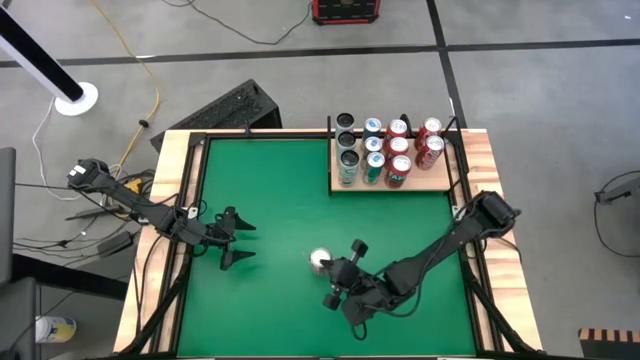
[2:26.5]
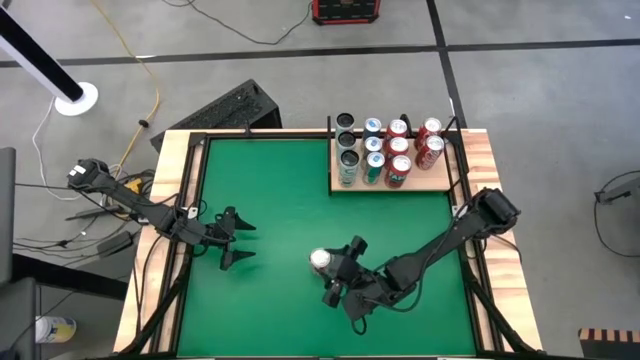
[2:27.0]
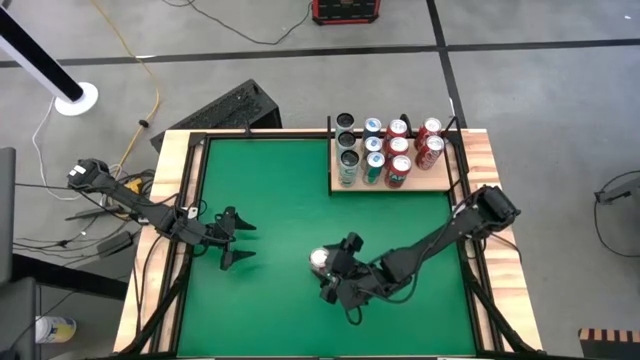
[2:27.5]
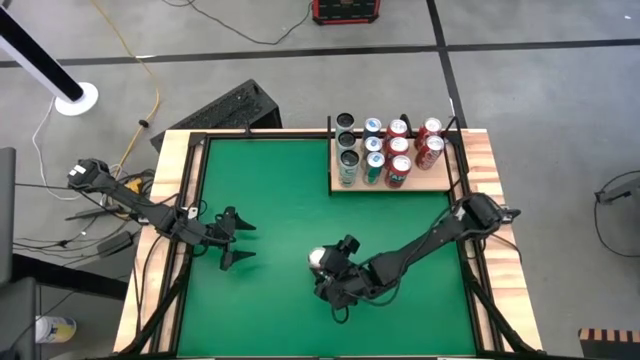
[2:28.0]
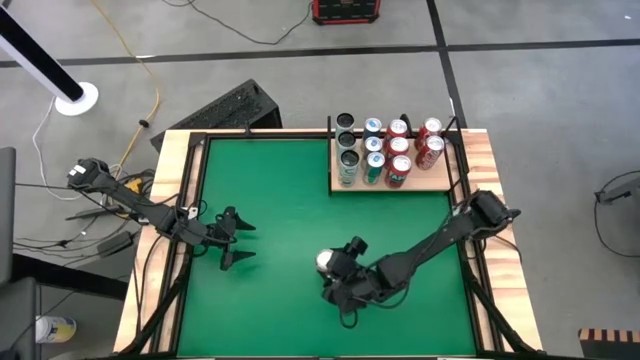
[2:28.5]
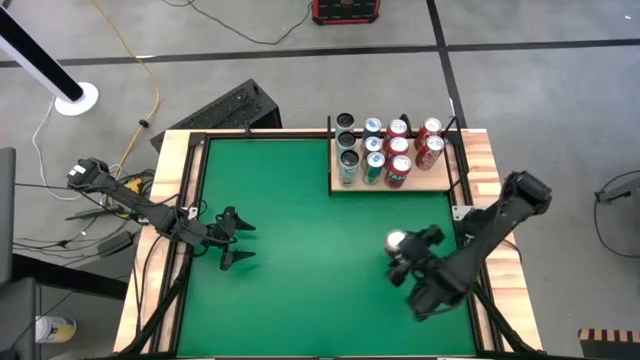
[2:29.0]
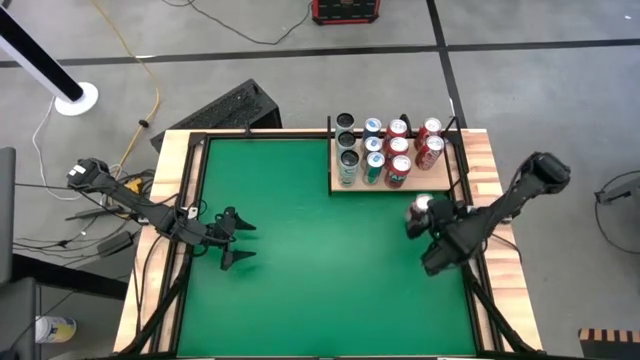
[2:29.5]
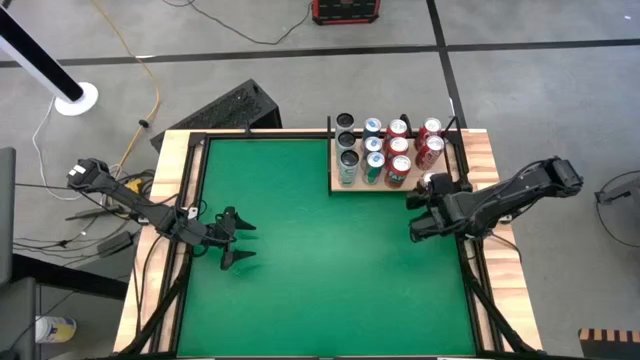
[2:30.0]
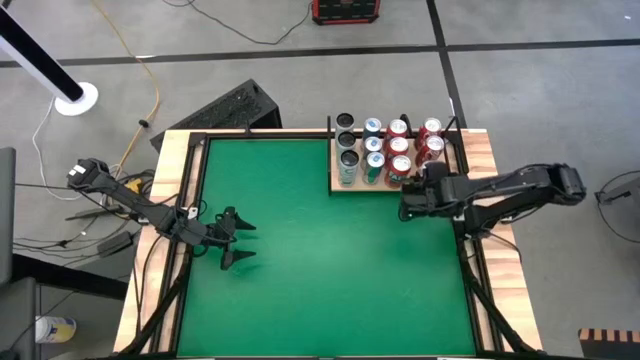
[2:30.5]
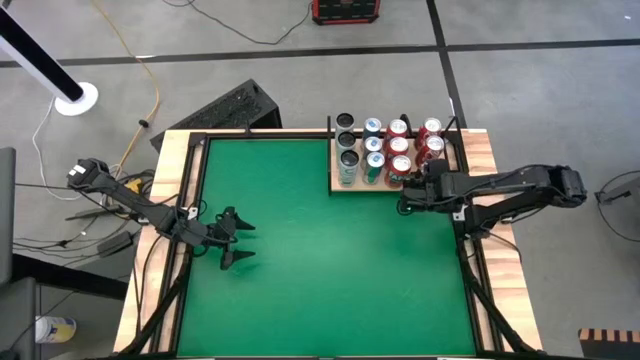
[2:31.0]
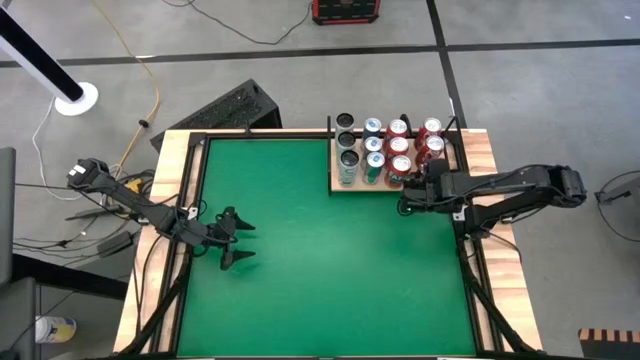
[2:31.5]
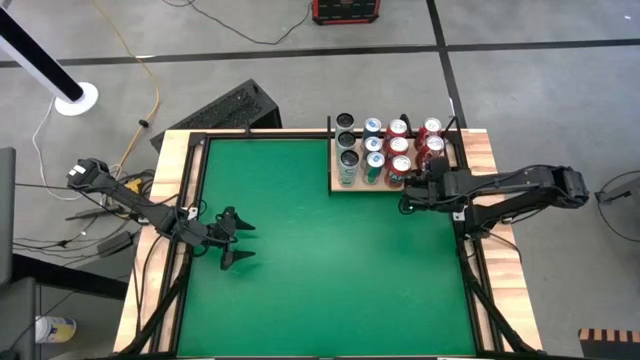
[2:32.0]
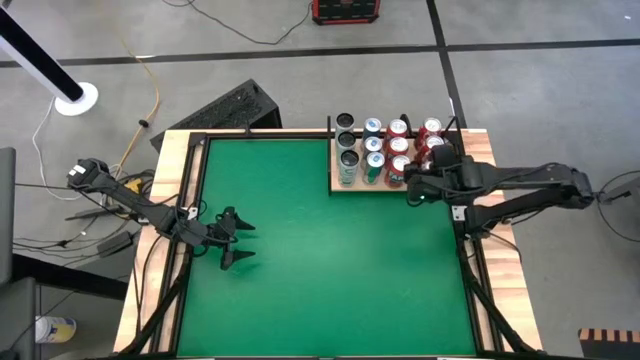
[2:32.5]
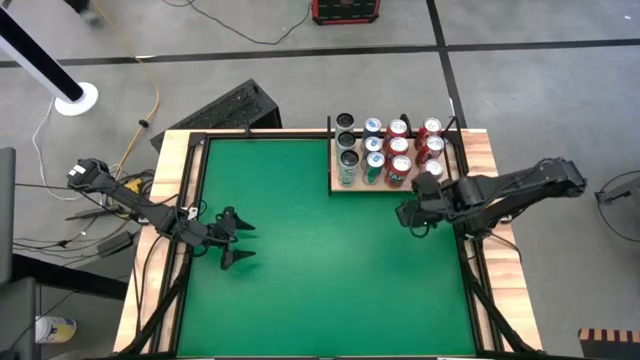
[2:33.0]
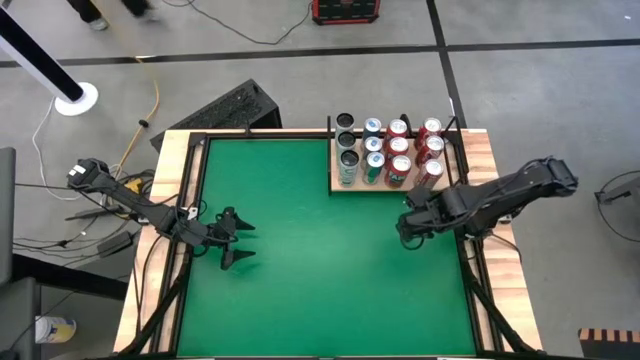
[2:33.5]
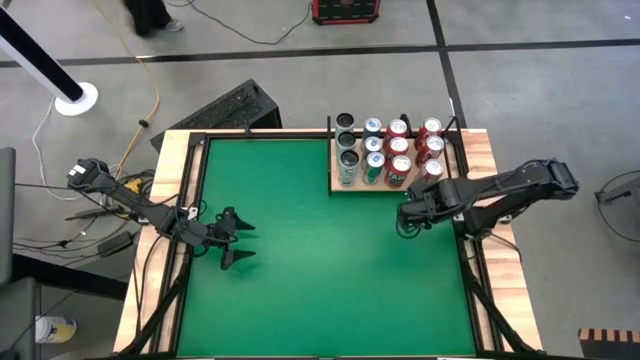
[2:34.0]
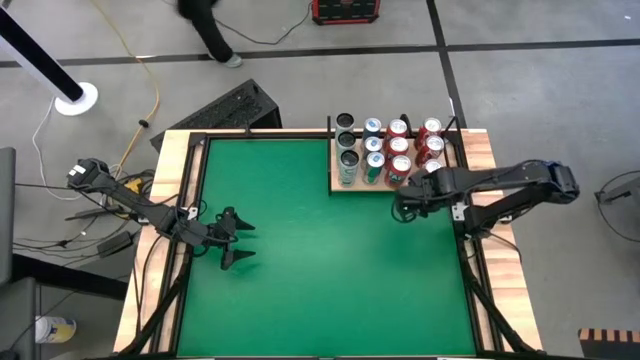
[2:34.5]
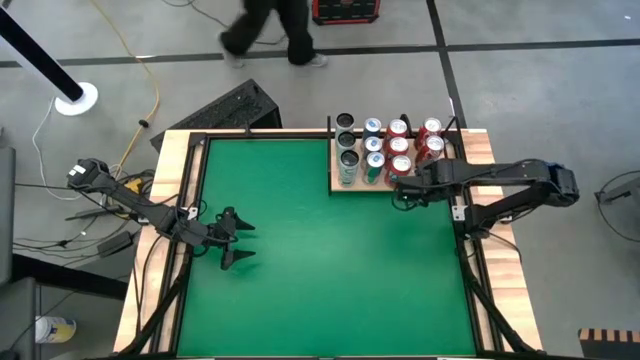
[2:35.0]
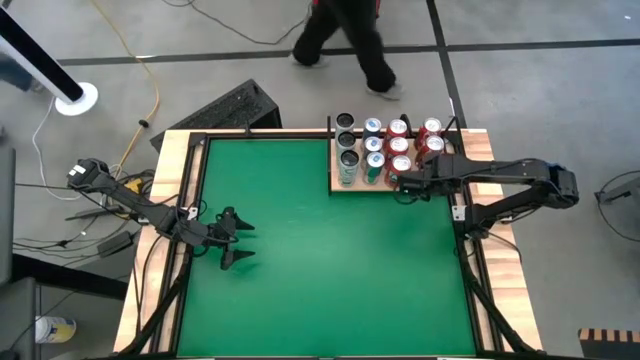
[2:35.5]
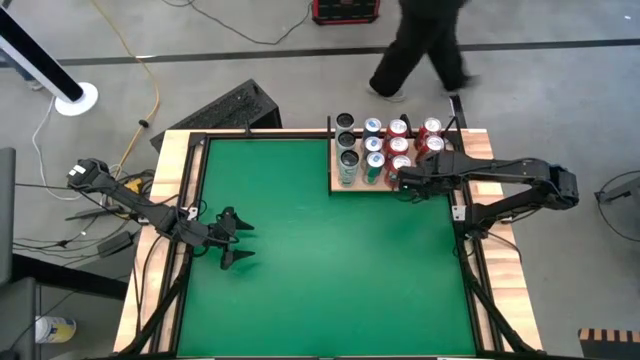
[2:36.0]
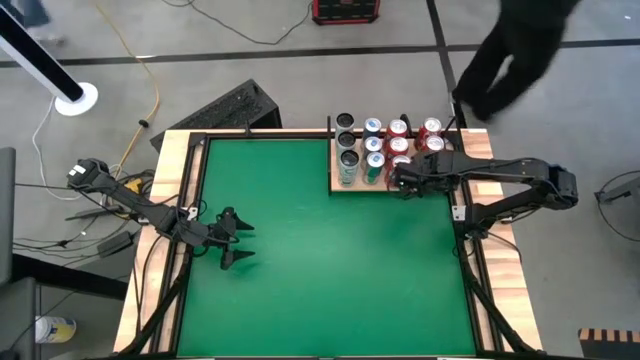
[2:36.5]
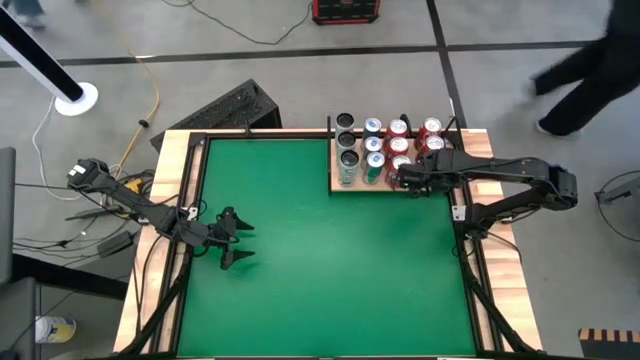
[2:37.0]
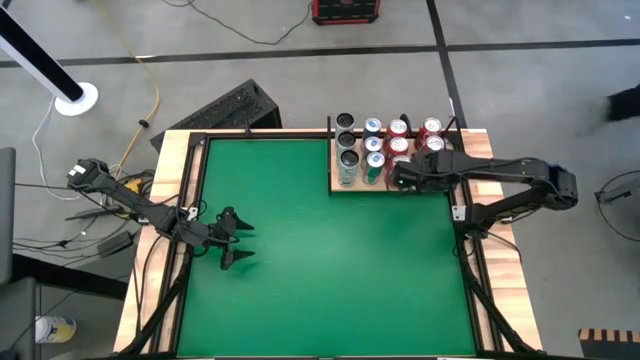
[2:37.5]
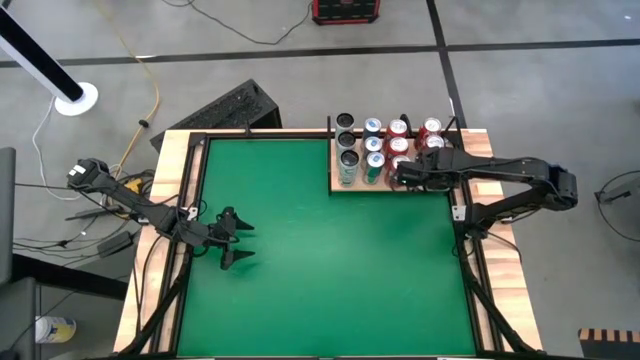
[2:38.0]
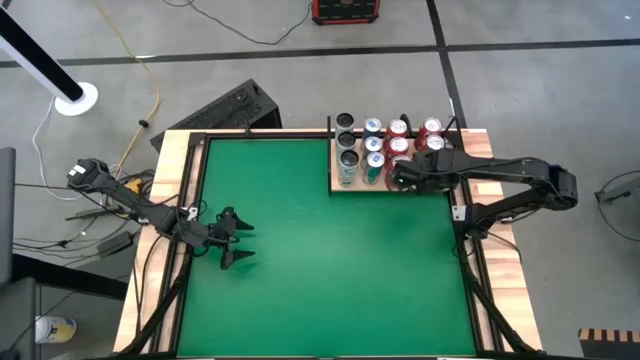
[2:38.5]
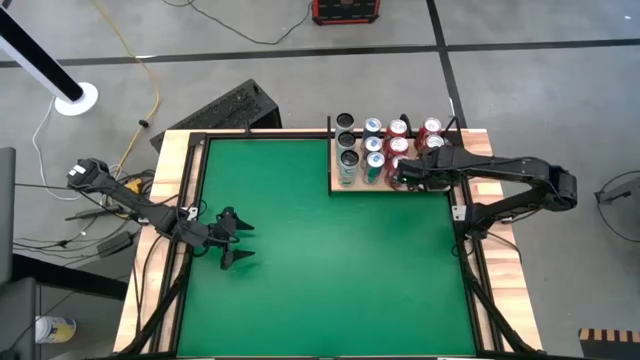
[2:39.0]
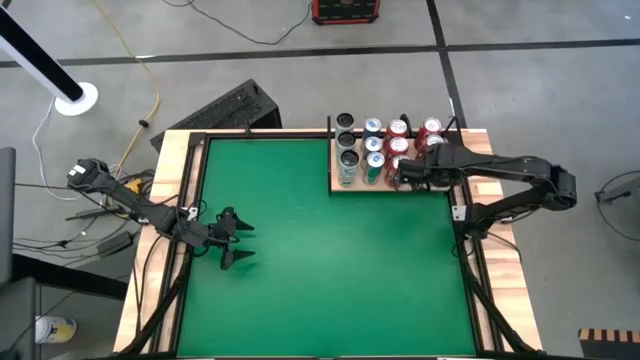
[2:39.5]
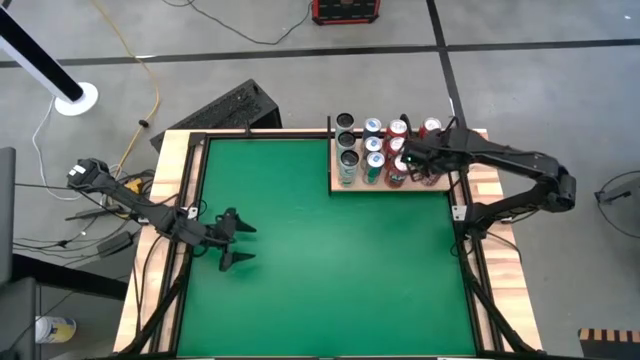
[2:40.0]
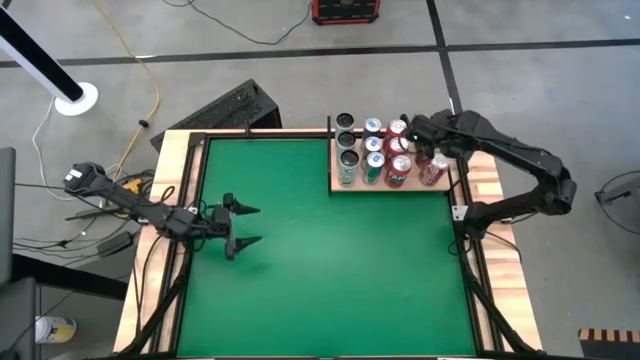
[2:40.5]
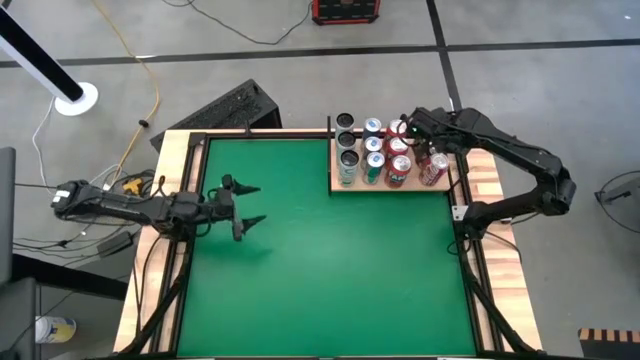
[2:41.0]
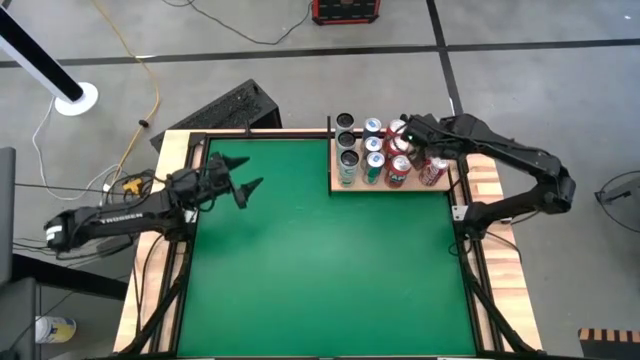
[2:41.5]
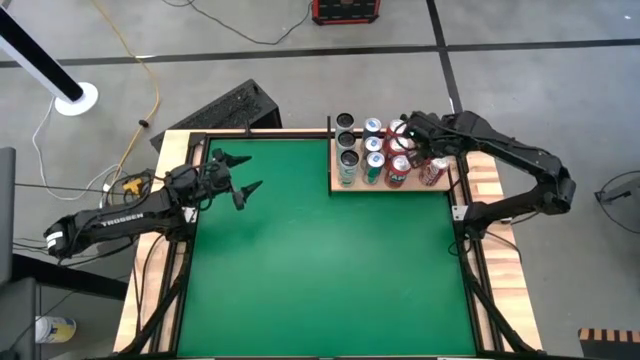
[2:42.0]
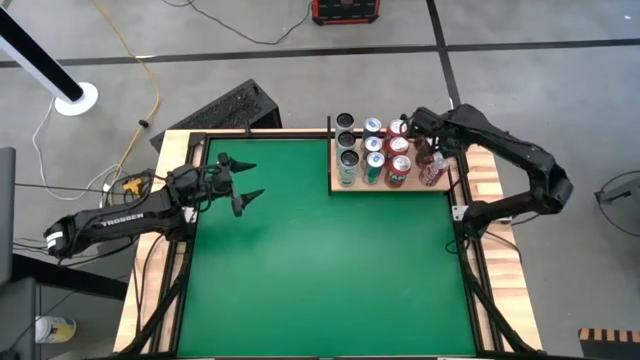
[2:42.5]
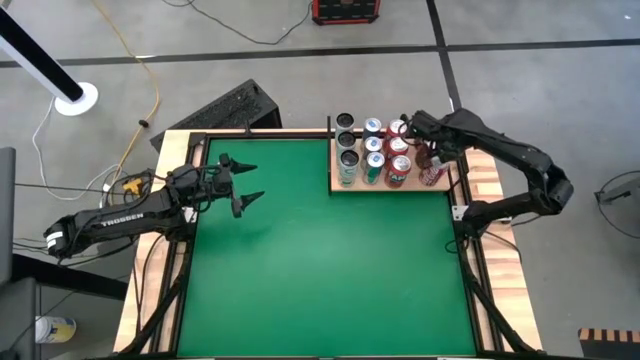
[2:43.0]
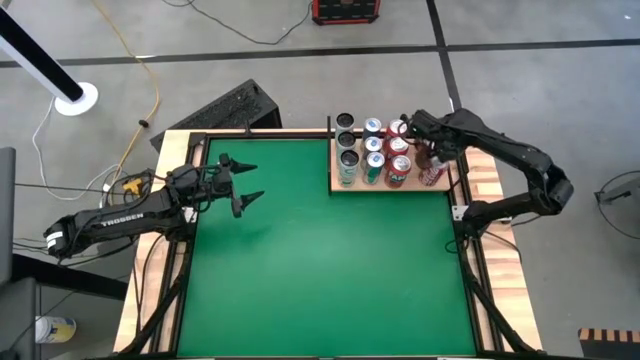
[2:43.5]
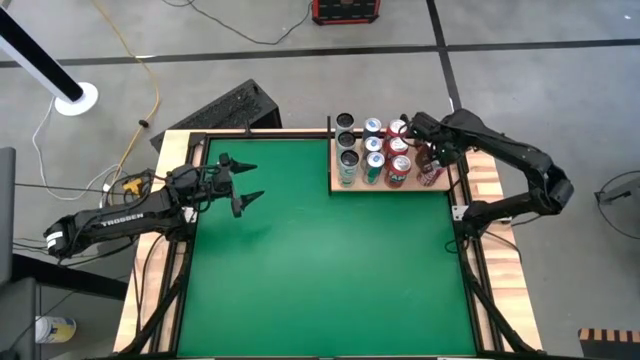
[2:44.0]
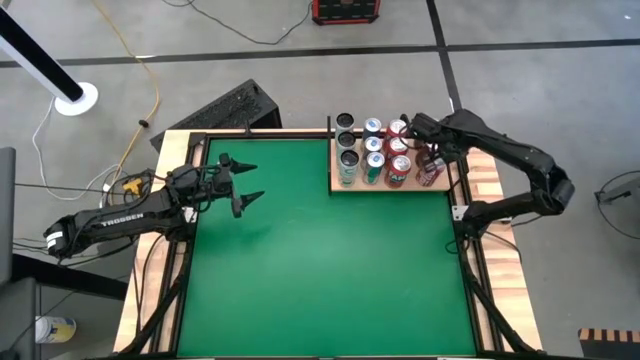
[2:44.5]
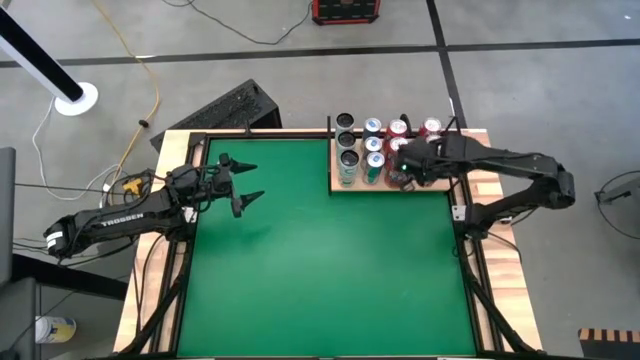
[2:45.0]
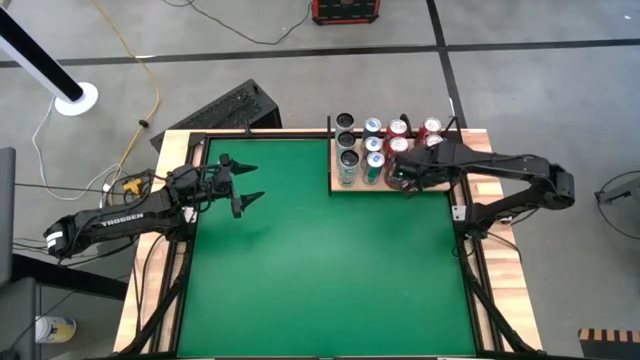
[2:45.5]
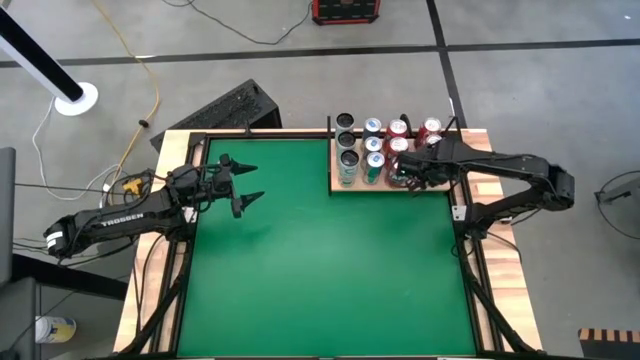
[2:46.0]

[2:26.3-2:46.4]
Task: Sort soda cans
Put the red soda can on the shelf align with the other red soda cans
